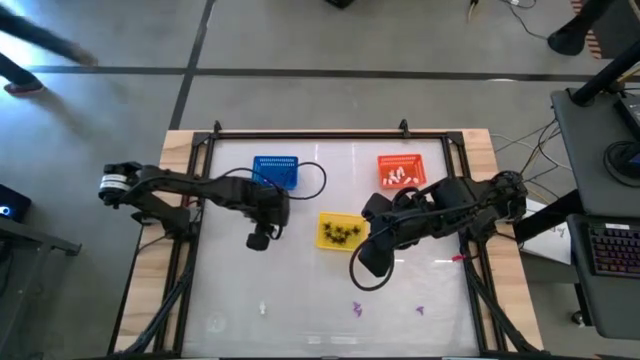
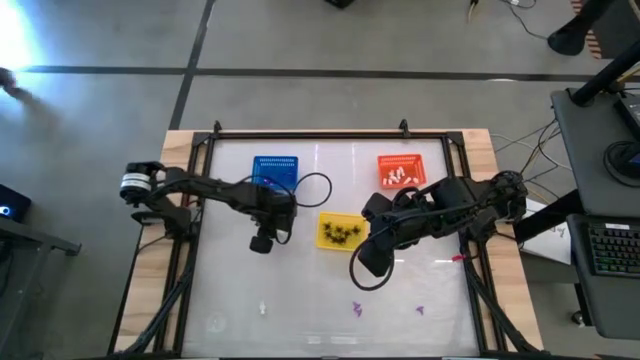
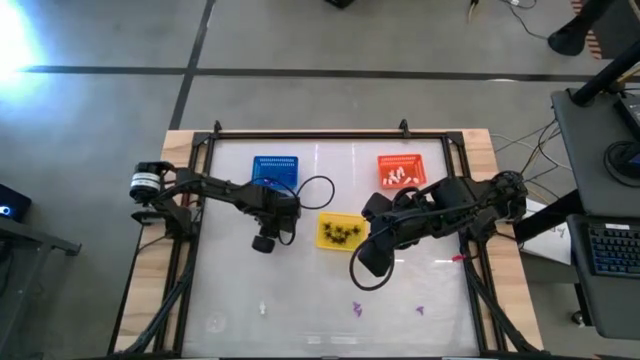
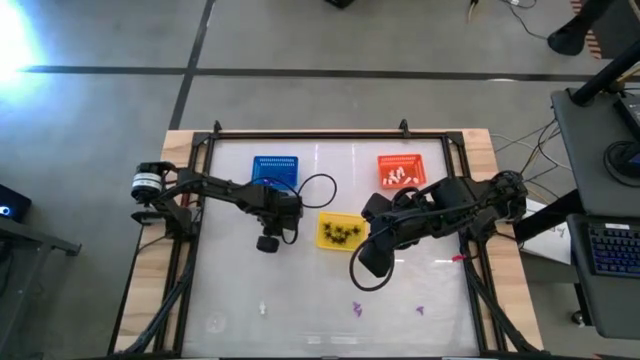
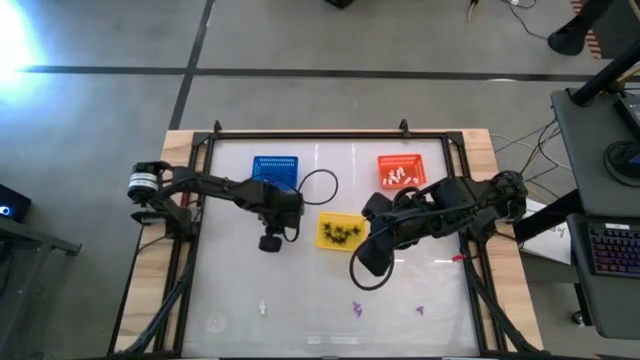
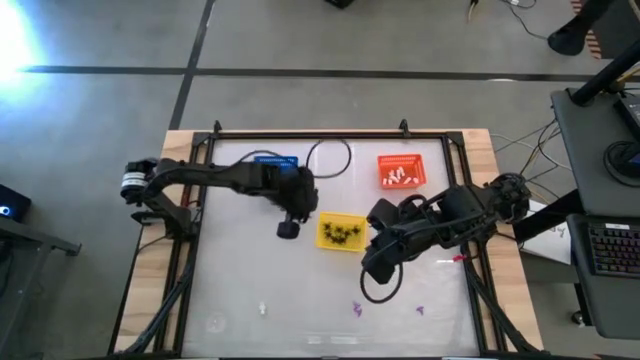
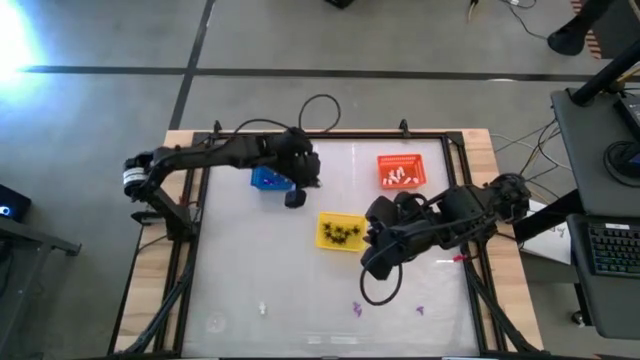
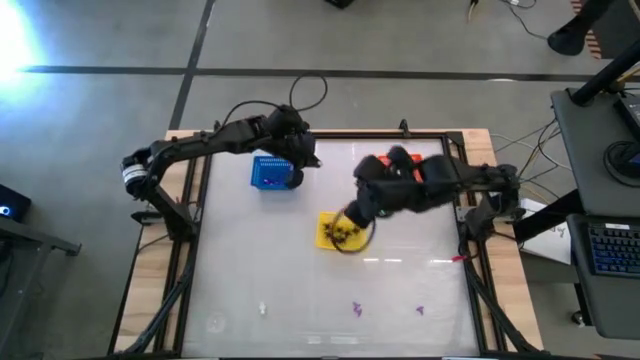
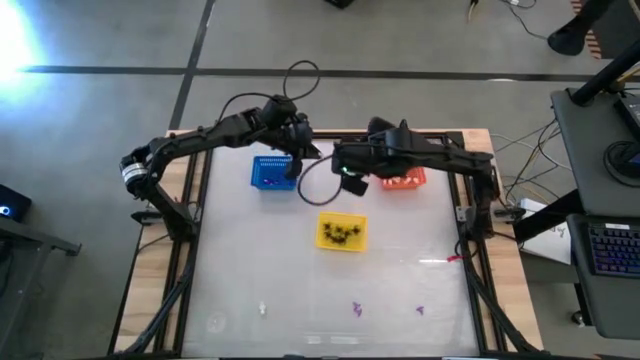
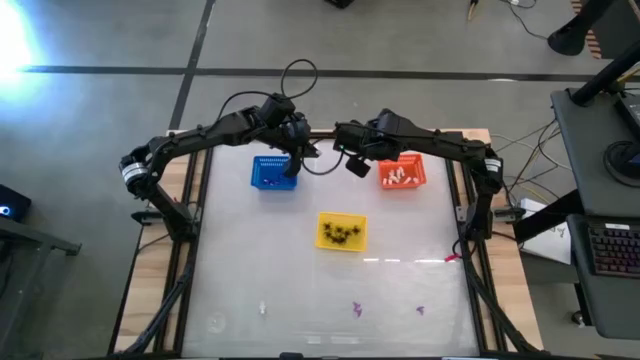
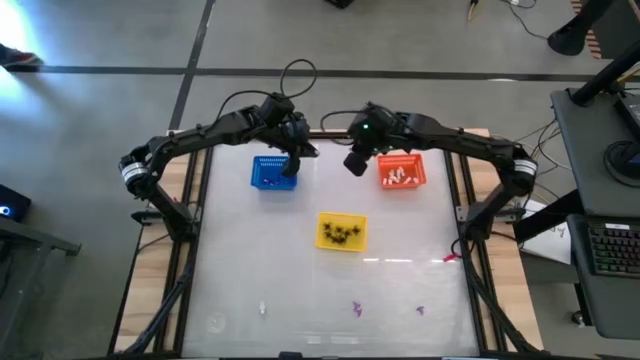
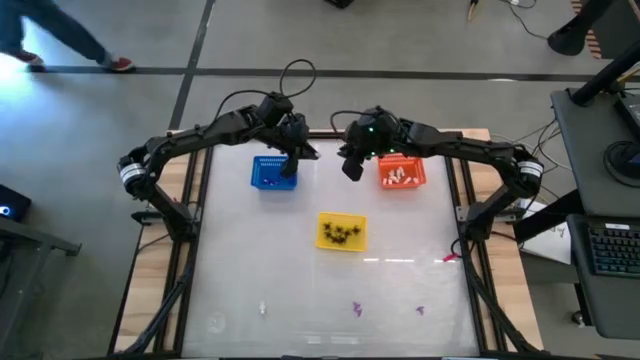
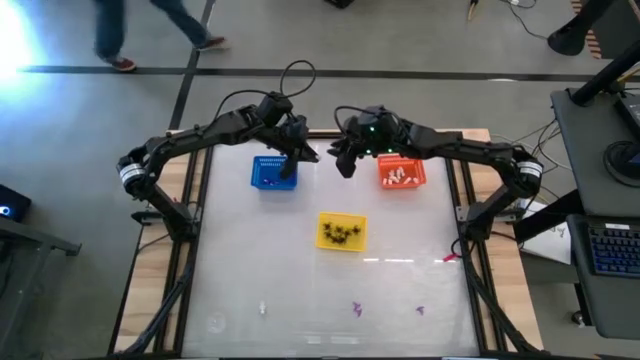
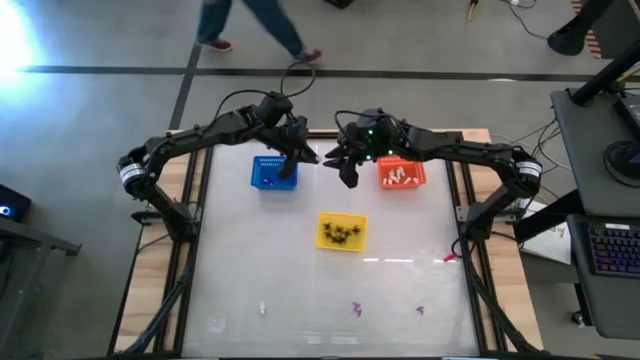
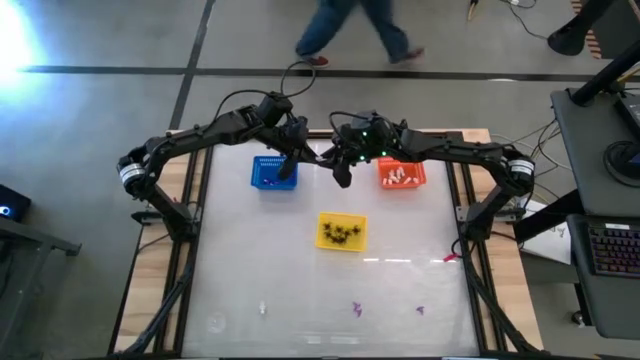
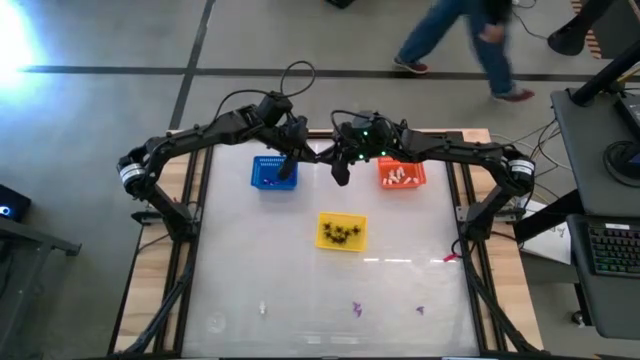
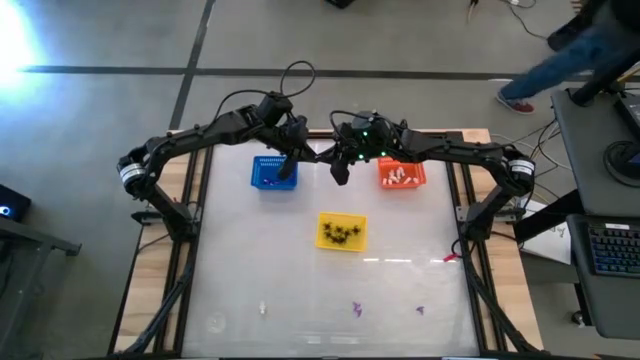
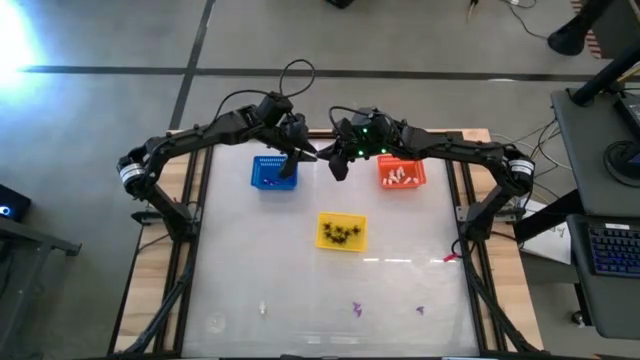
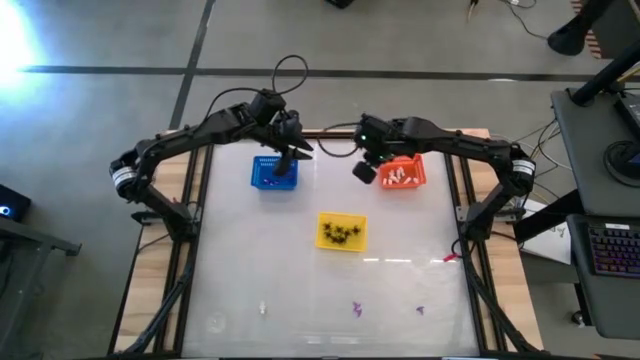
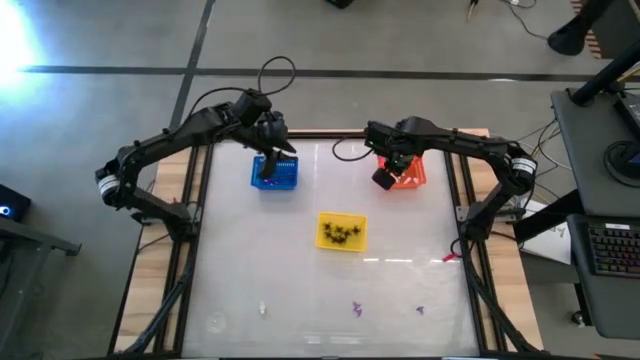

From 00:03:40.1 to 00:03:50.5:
Task: Sort Halloween decoration
Put the white skeleton toy into the orange bin

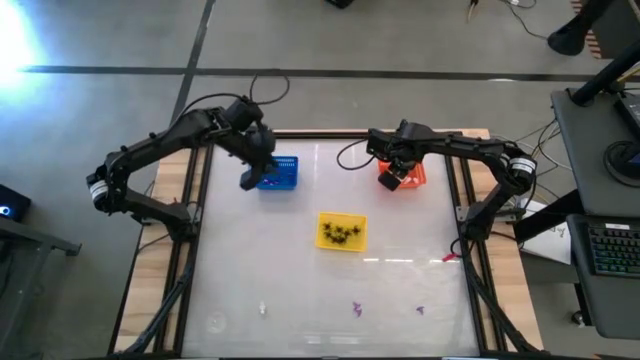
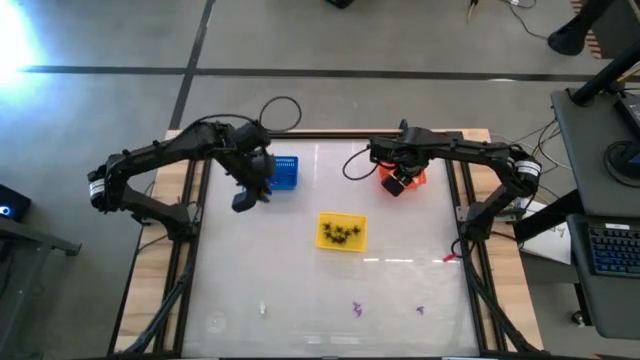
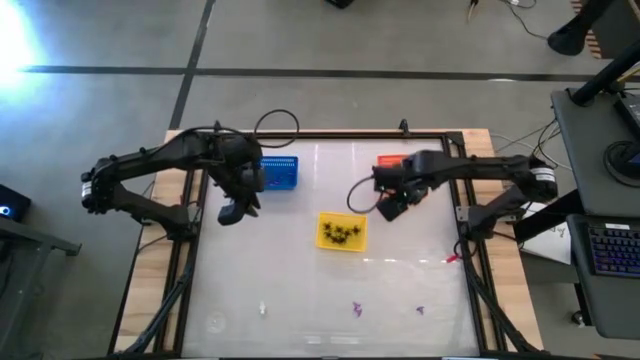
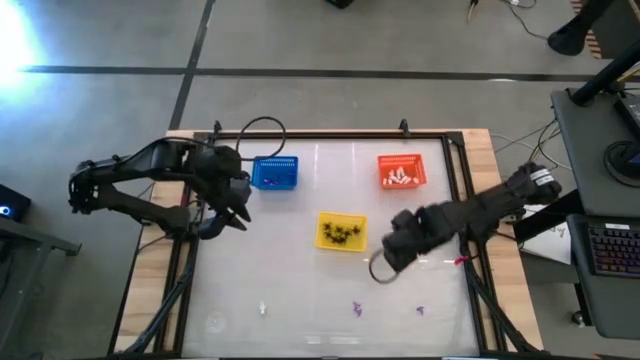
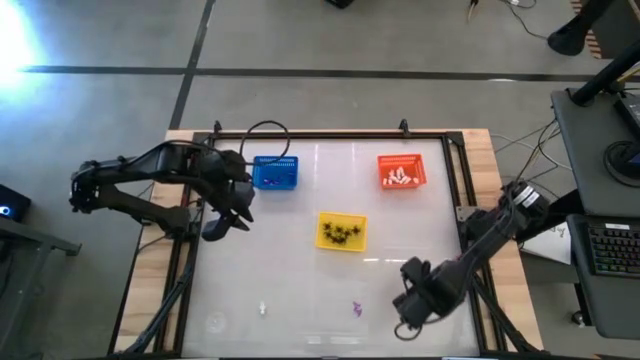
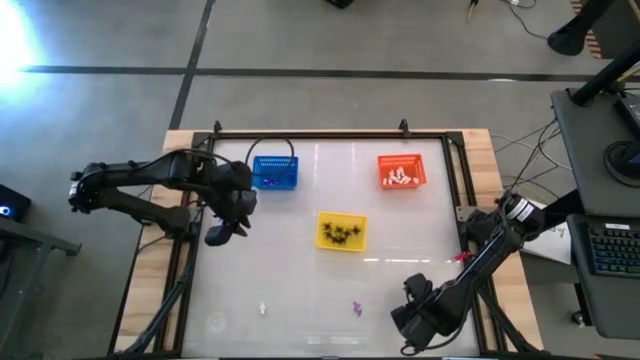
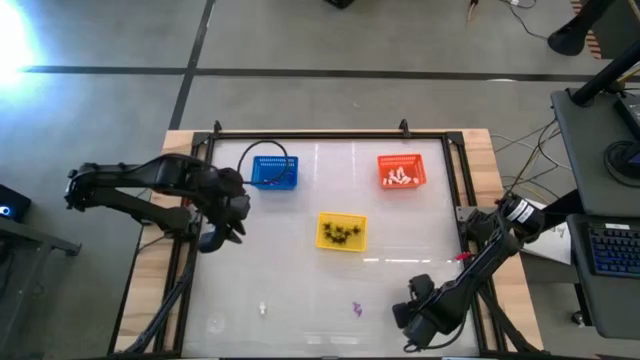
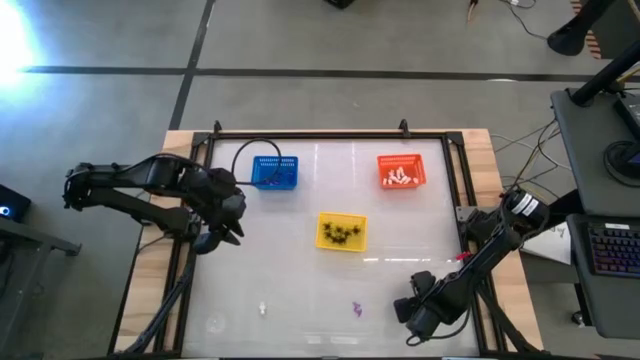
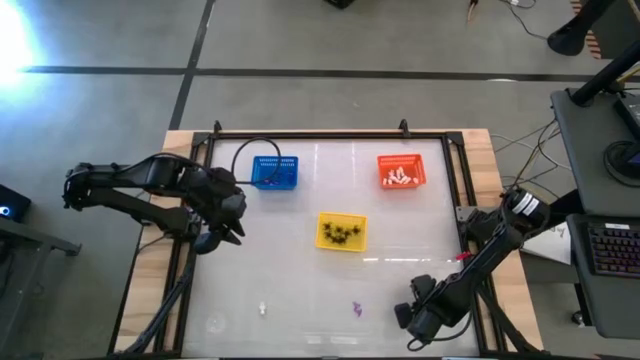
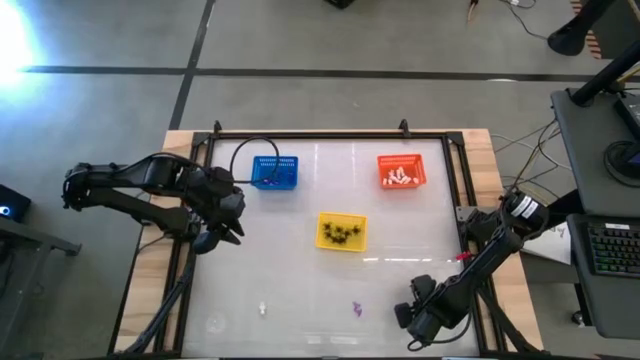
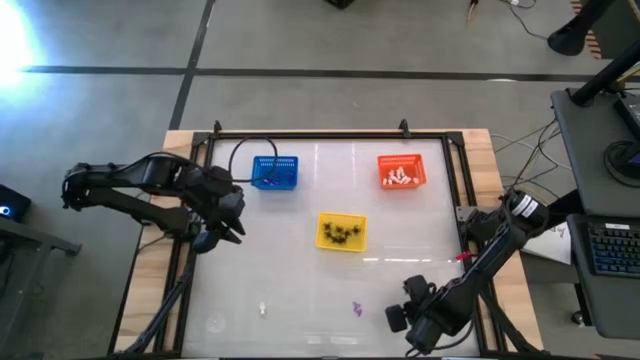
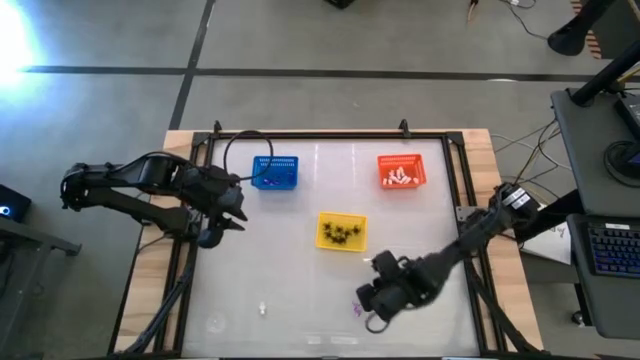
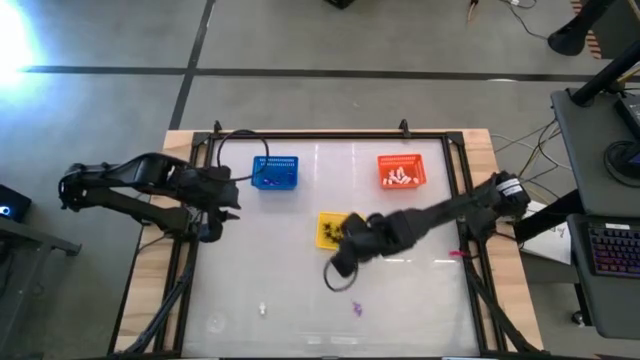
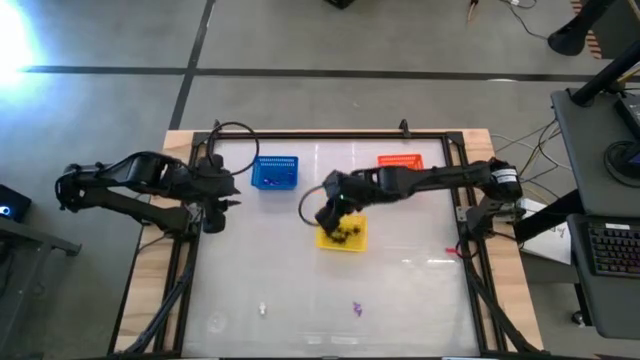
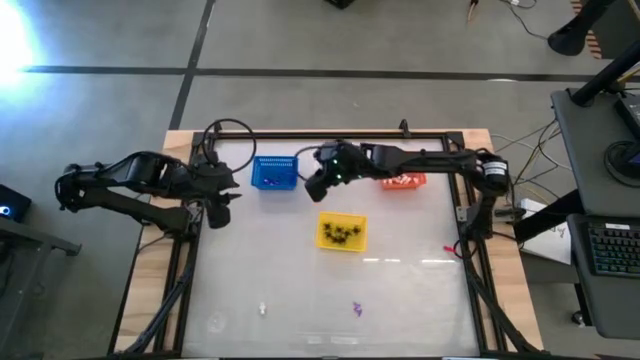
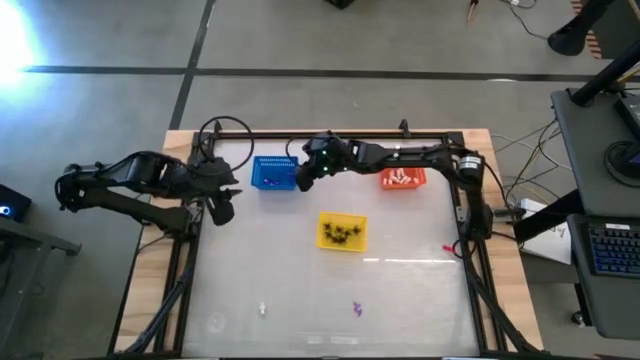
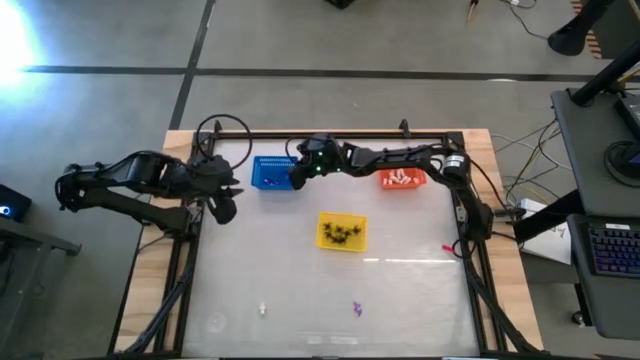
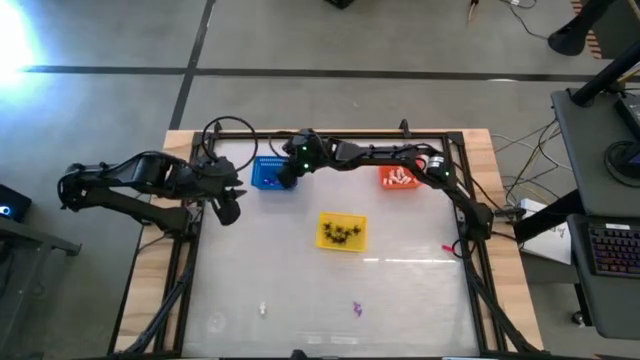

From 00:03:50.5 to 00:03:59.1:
Put the purple witch hat toy into the blue bin

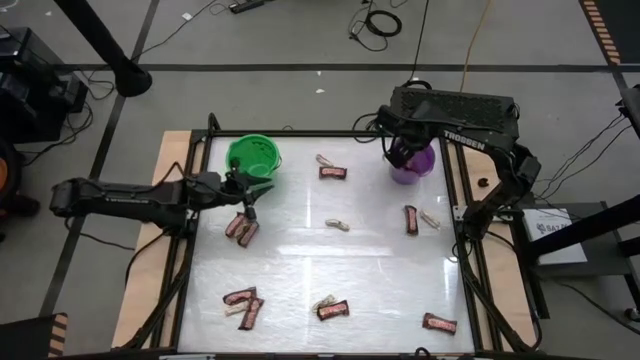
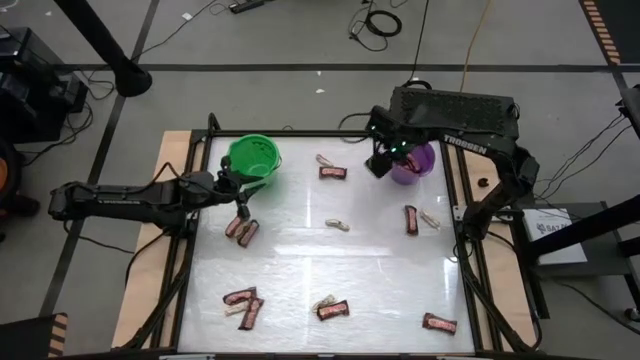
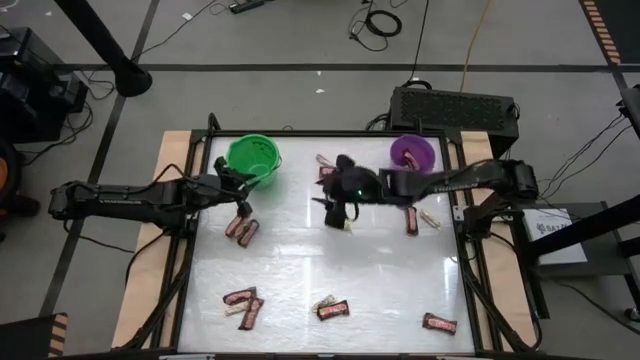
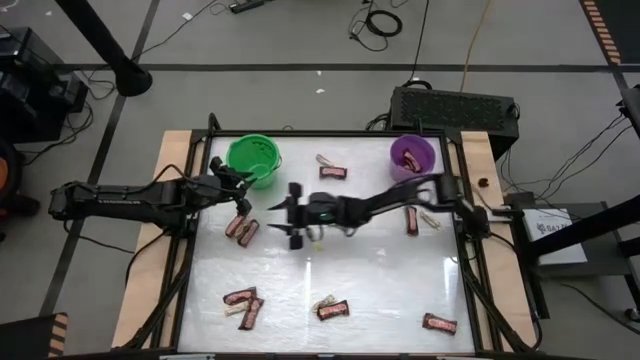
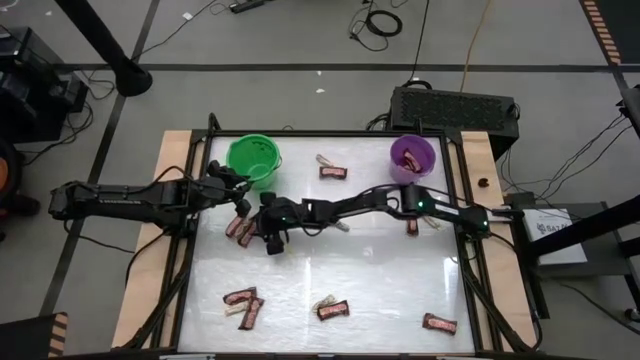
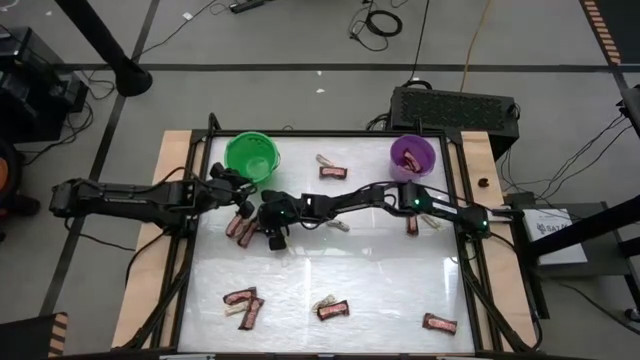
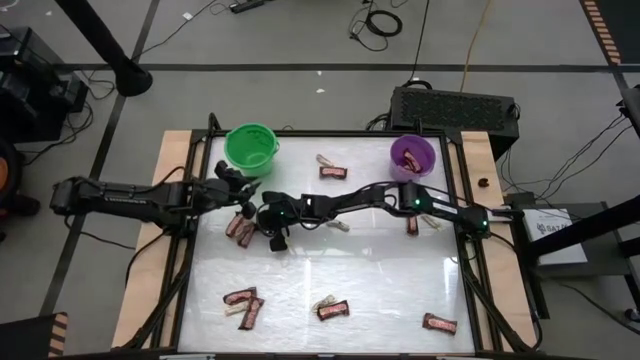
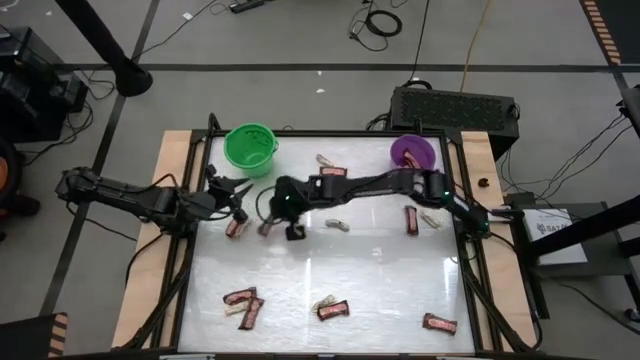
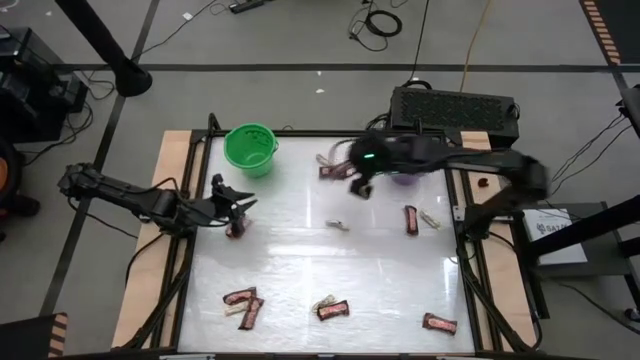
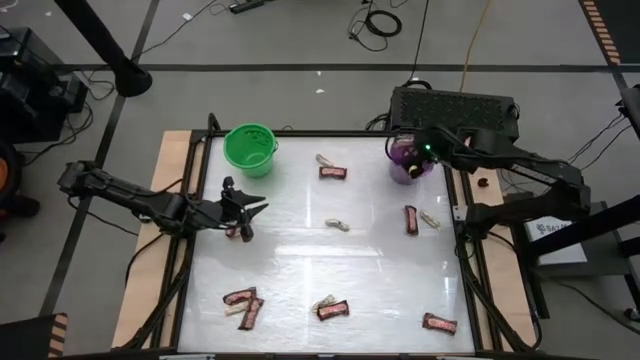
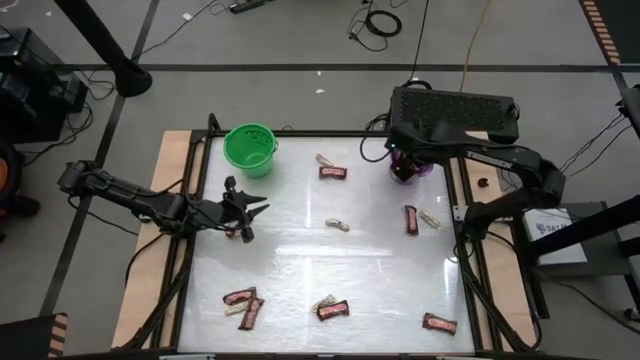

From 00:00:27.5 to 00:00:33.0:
Task: Sort candy by brand, put in halloween buckets
Put the brown chocolate bar into the purple bucket
